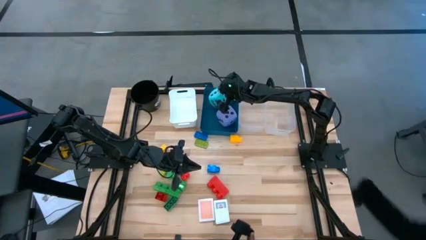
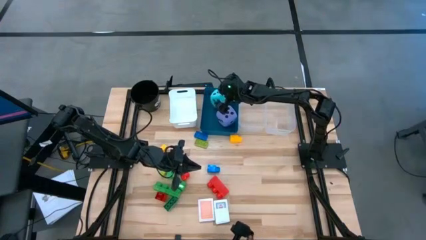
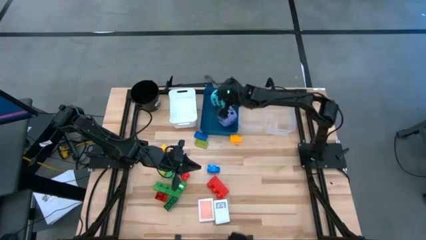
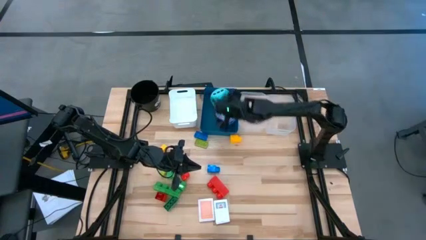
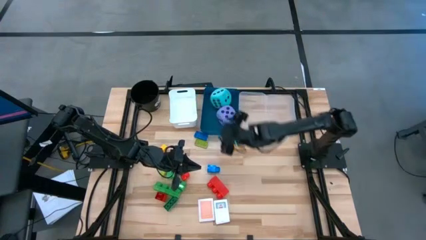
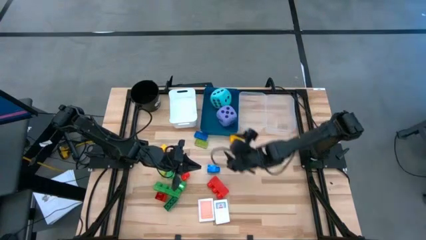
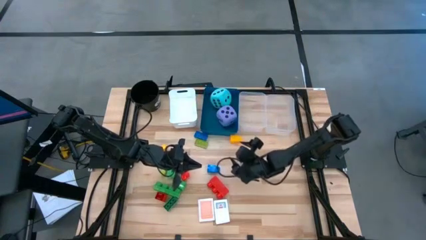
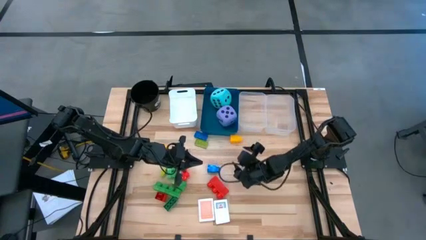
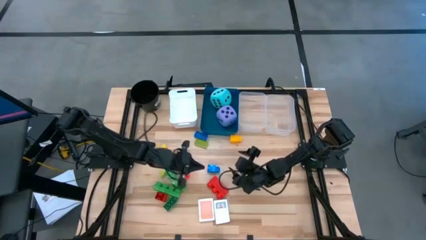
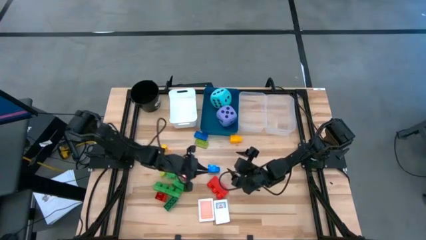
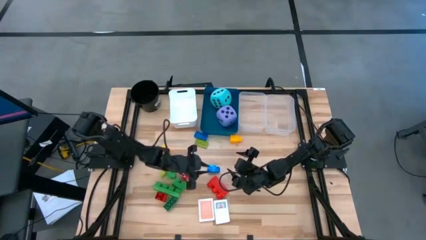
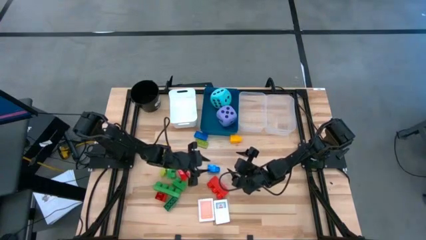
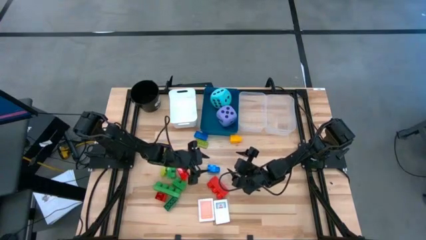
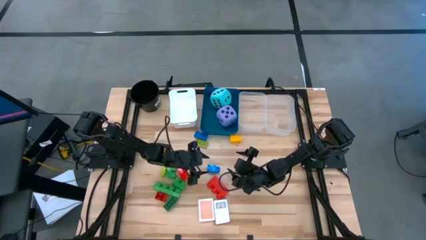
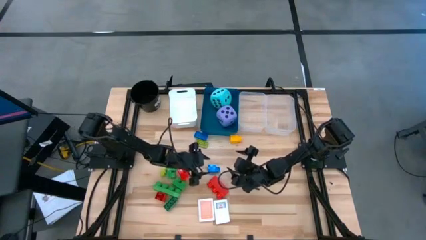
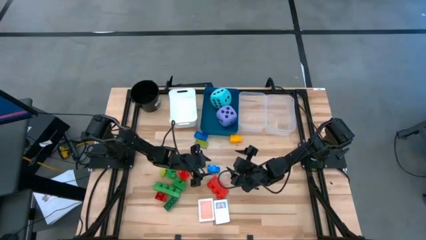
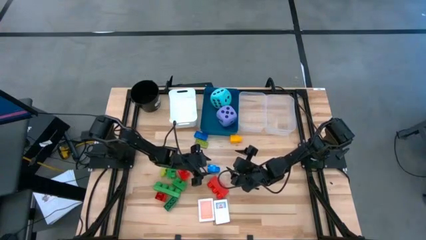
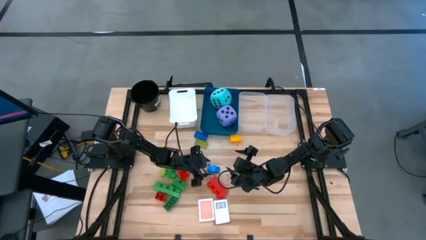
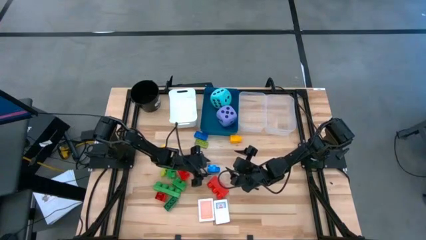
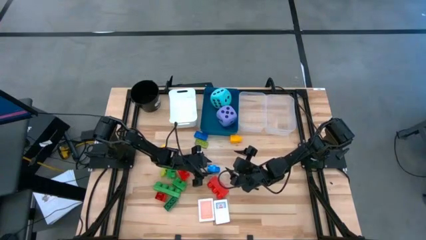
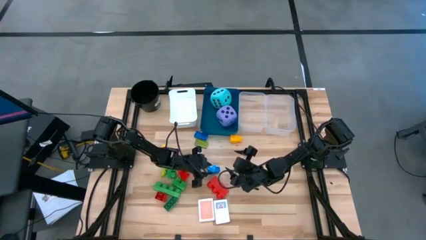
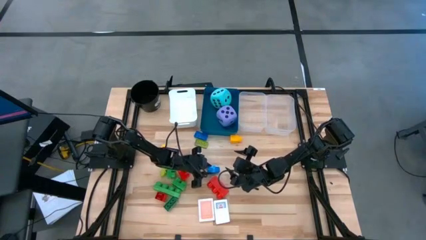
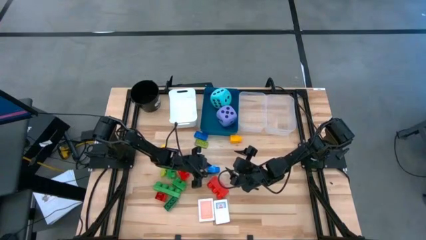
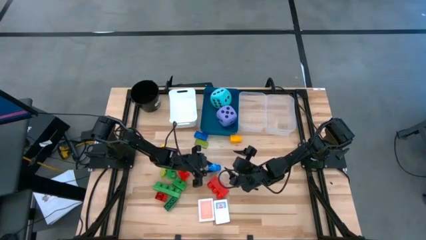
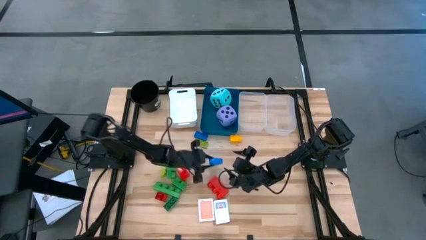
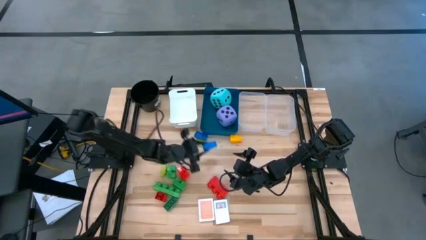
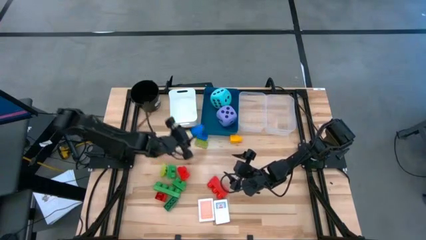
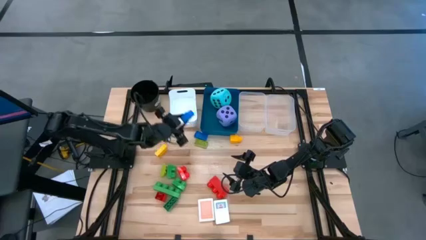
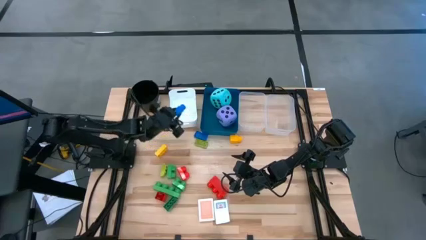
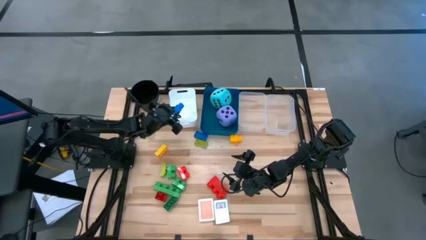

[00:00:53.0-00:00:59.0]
Task: Pick & Place Toys
Put the large blue game piece into the white bin

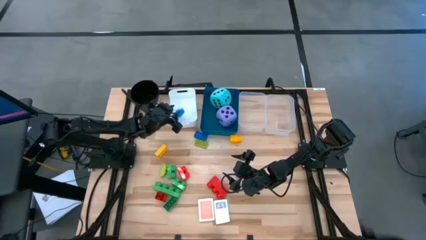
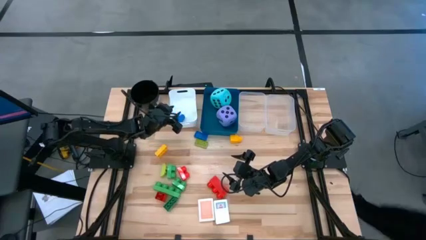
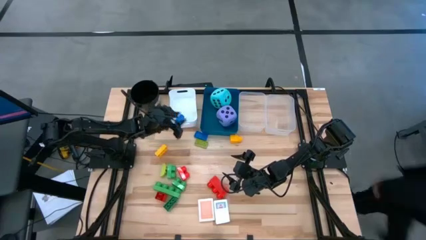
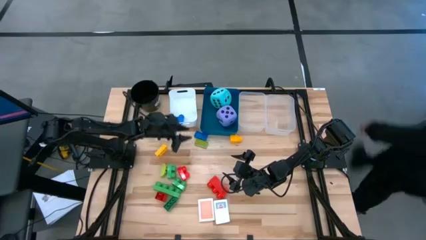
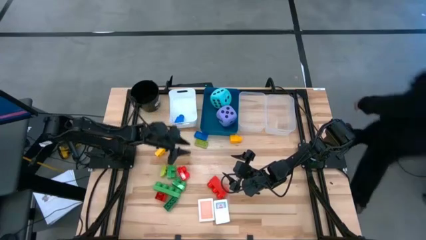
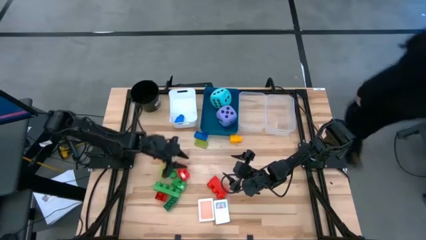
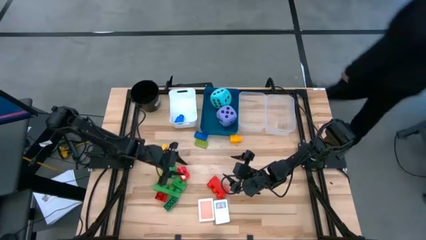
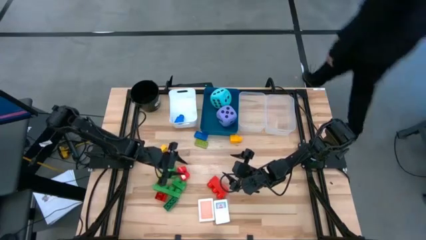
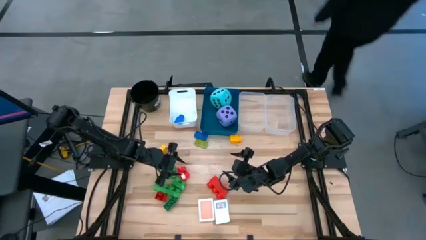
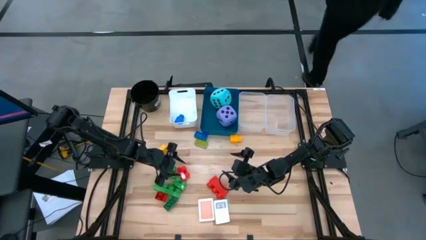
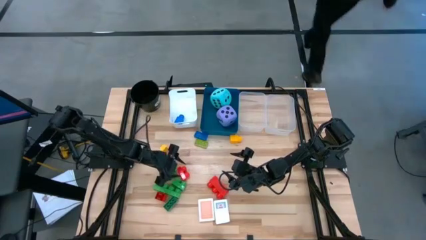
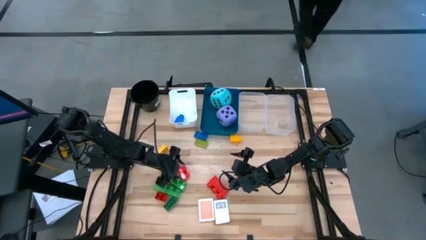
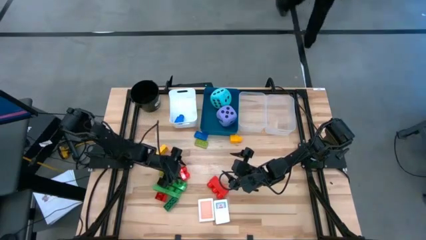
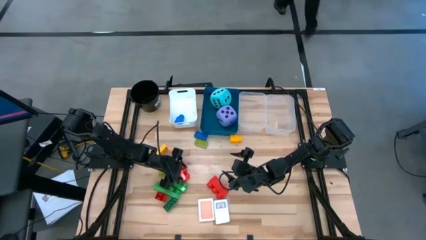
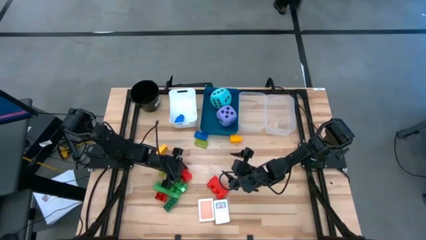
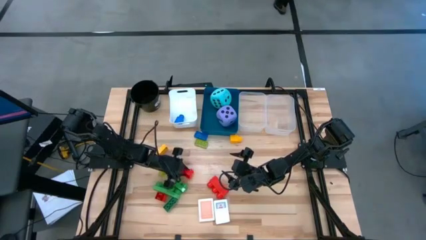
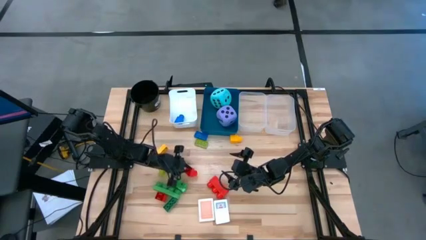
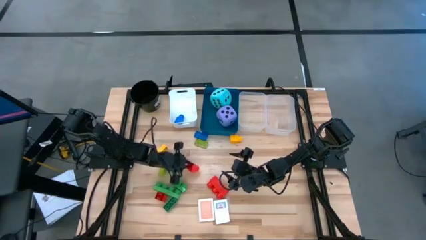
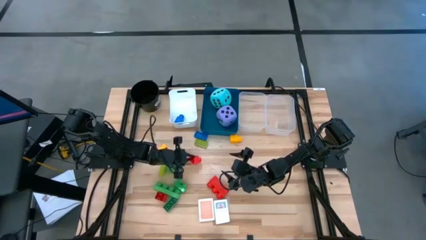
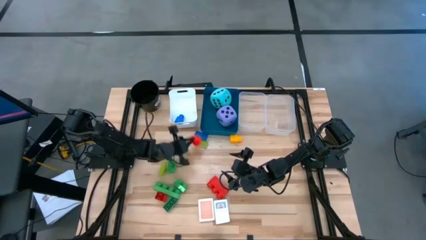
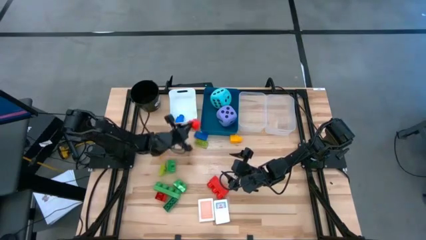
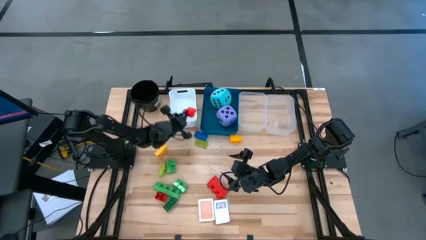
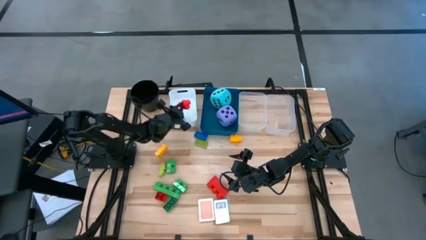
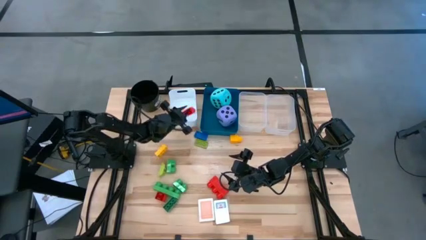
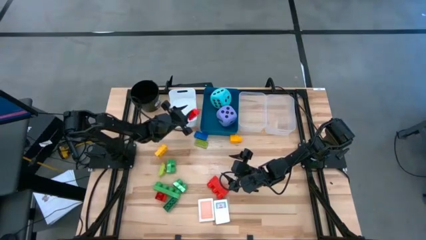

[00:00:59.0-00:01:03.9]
Put the top large red game piece into the white bin

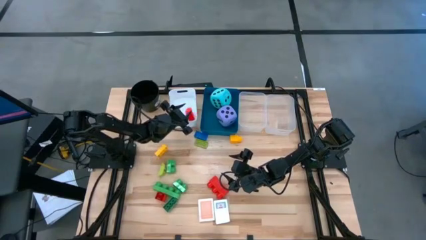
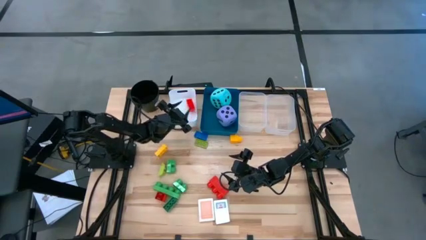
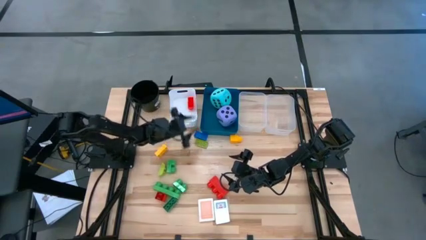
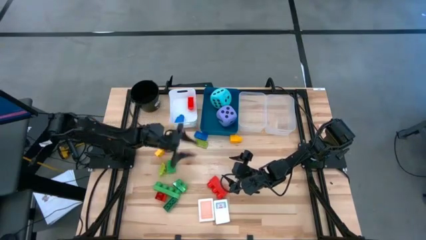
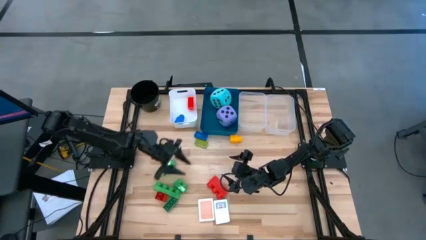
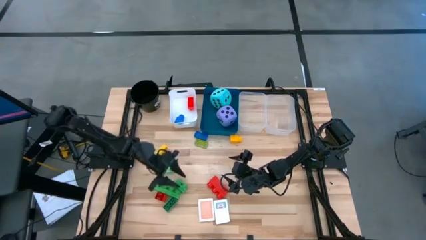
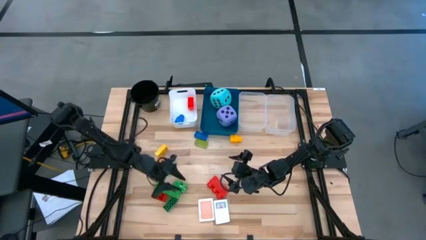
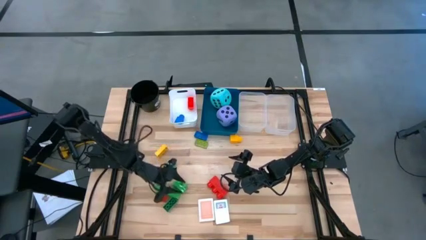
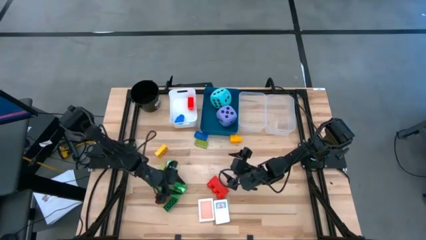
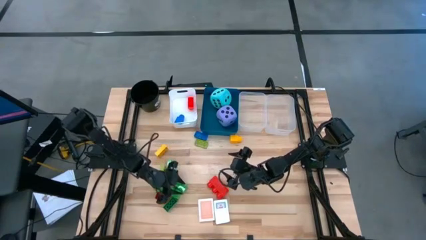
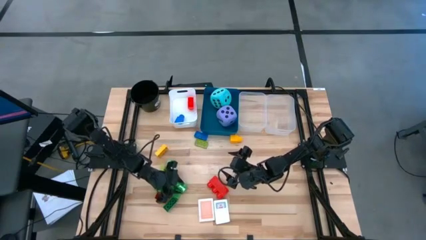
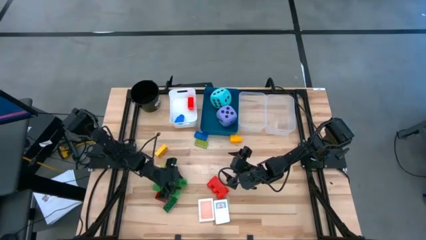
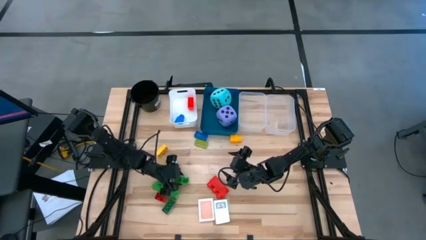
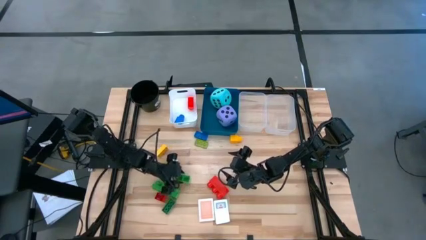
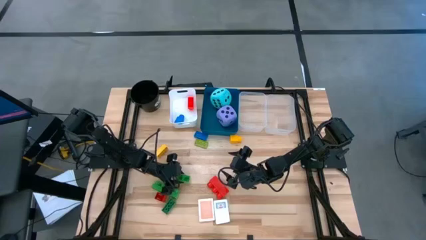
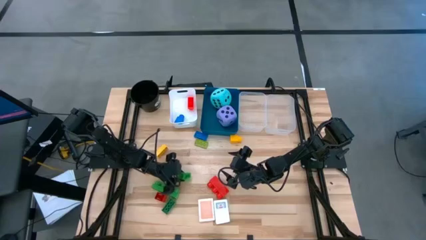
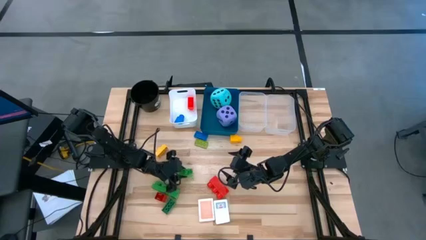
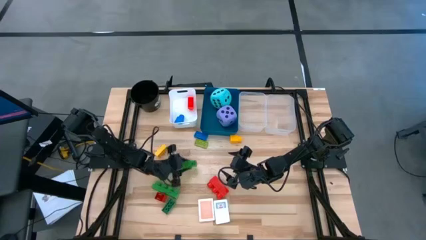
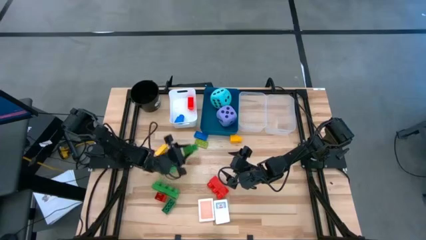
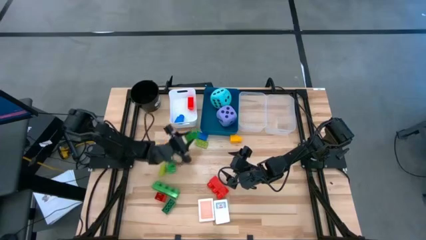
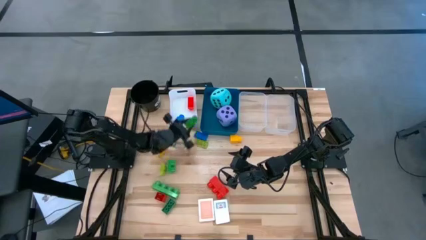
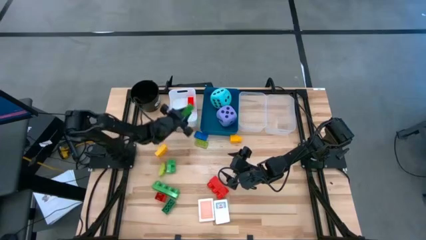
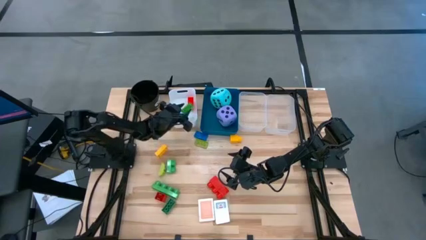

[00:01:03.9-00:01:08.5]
Put the middle large green game piece into the white bin
